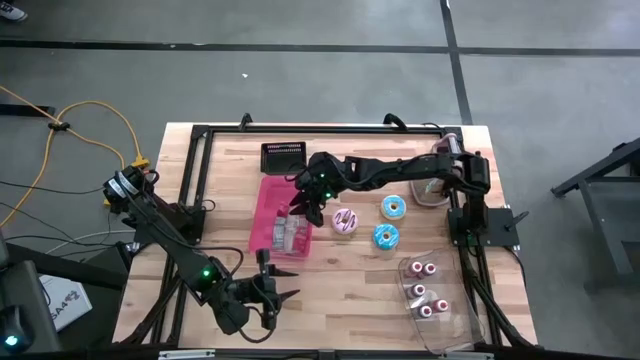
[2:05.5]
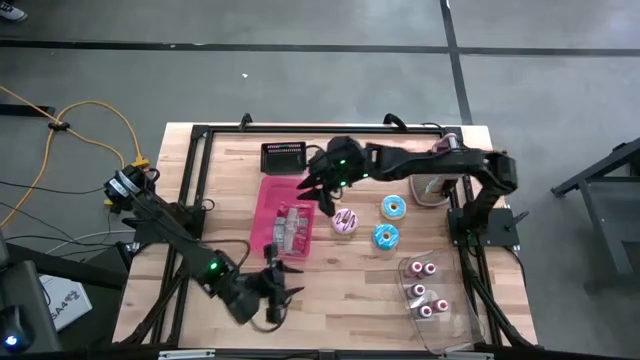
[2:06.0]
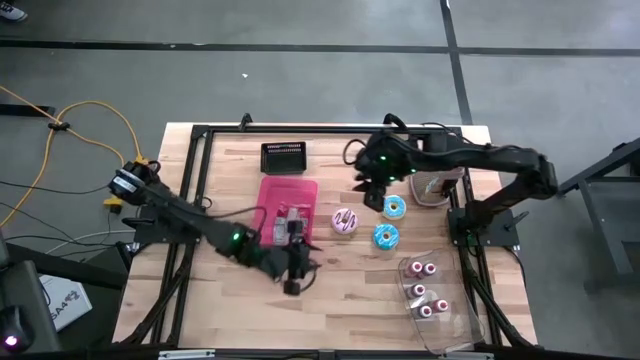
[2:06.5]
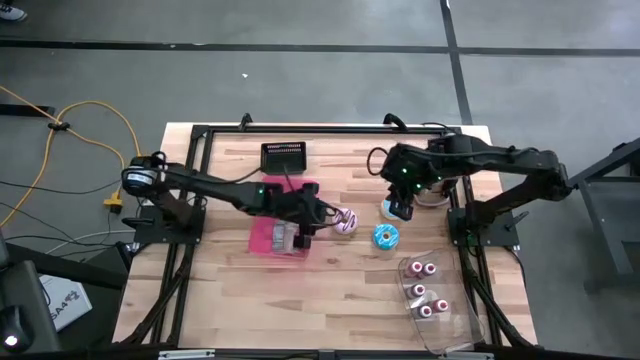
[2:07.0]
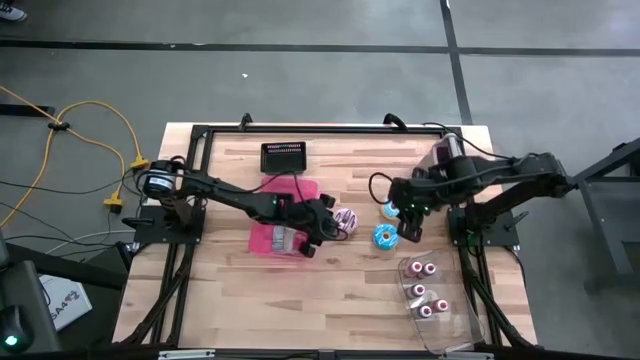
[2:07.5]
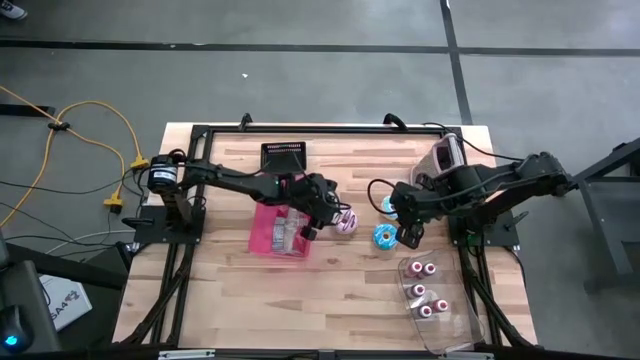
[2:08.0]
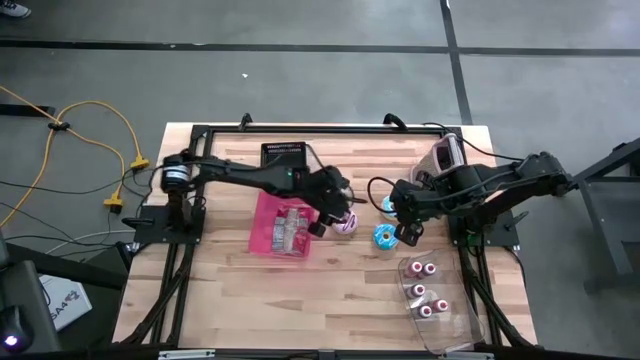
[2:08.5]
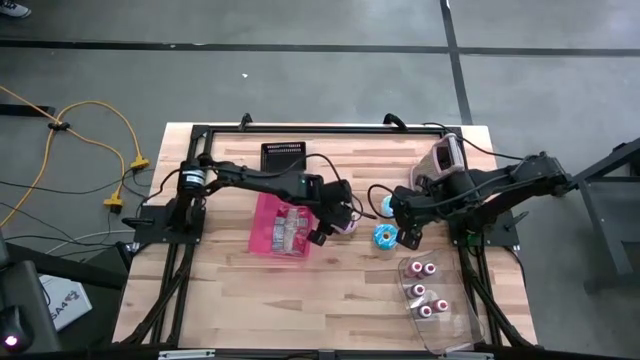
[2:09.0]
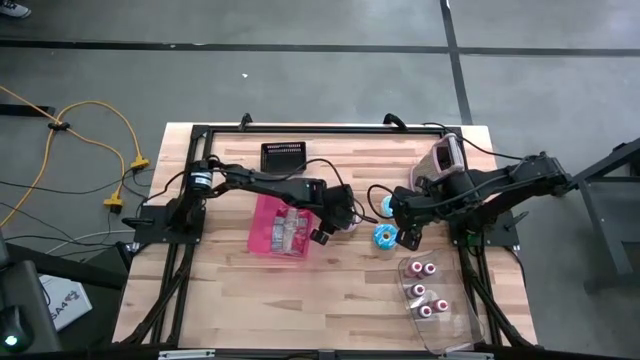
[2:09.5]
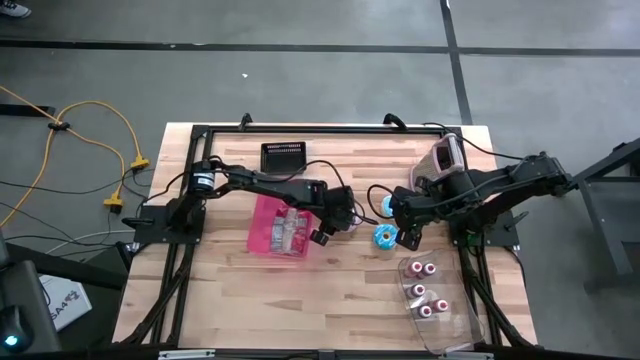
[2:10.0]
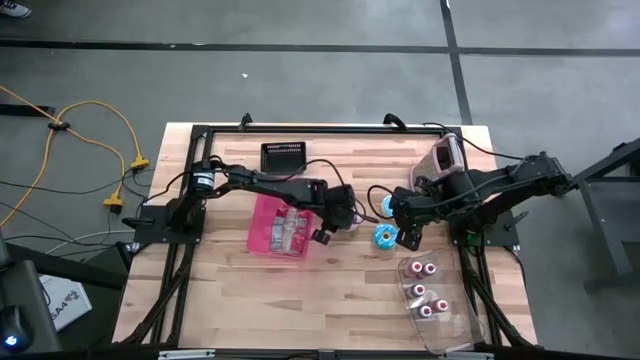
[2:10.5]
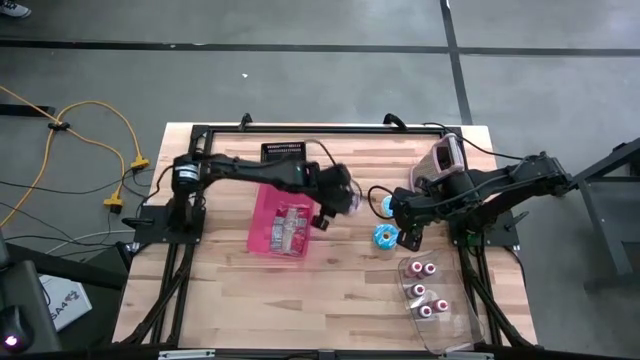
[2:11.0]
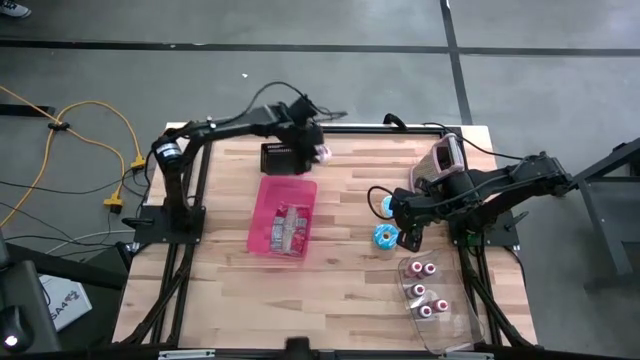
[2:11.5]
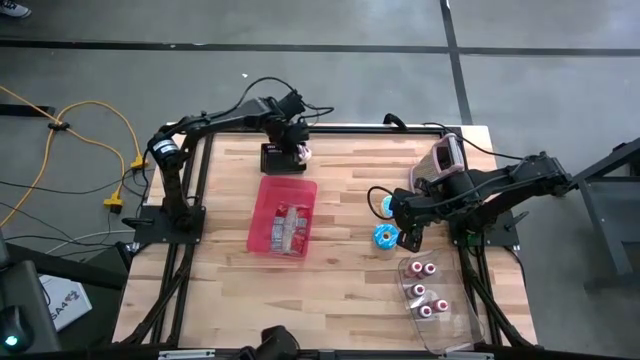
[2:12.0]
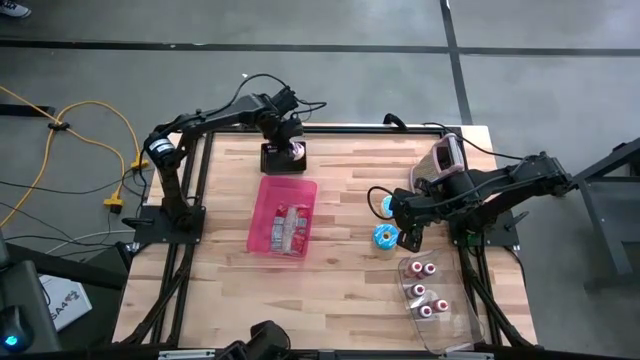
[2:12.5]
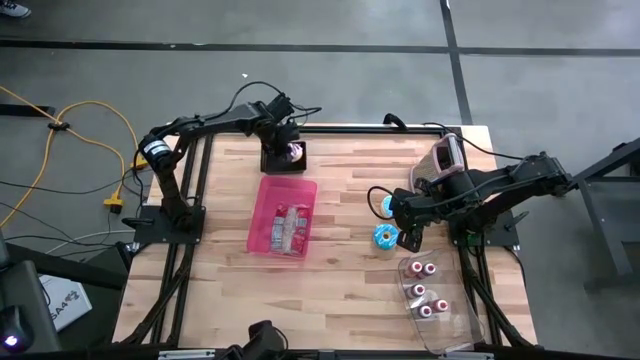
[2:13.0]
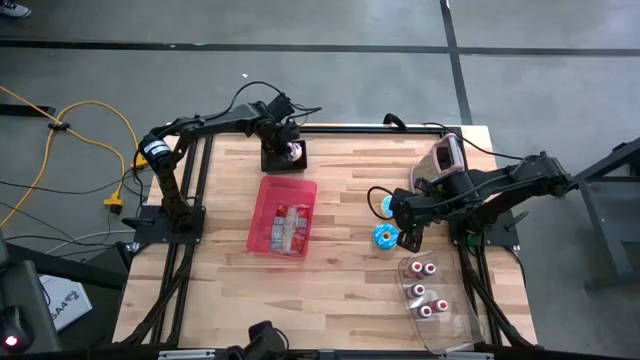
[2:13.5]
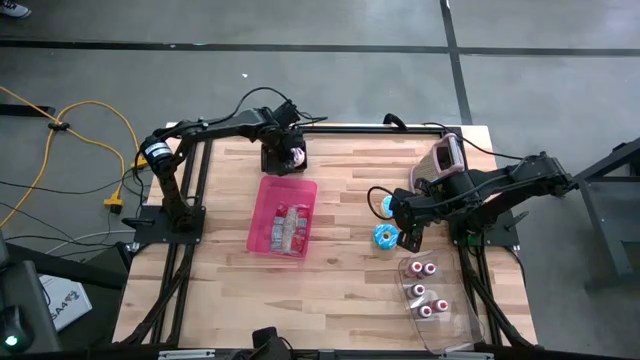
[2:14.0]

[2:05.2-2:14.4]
Put the purple donut into the black bin

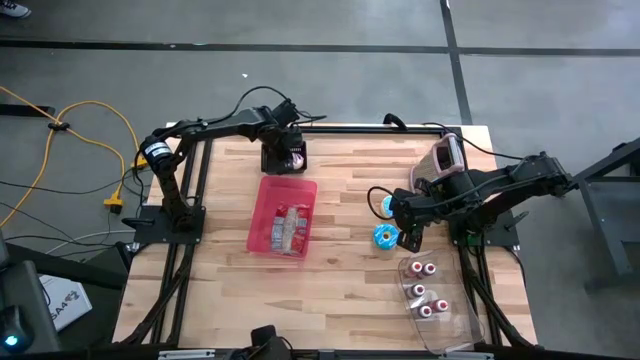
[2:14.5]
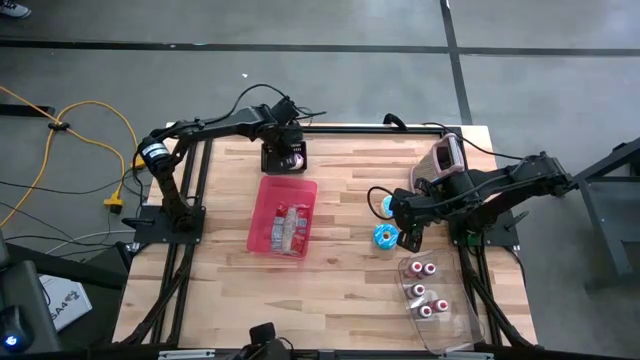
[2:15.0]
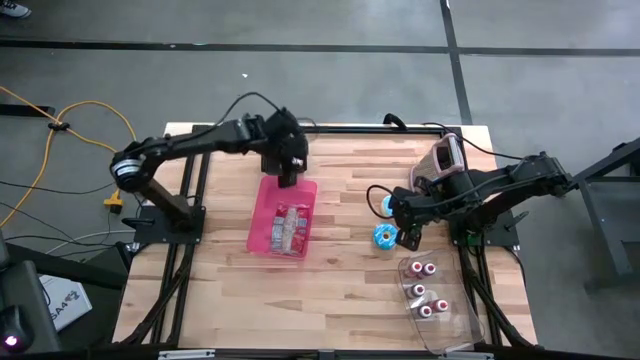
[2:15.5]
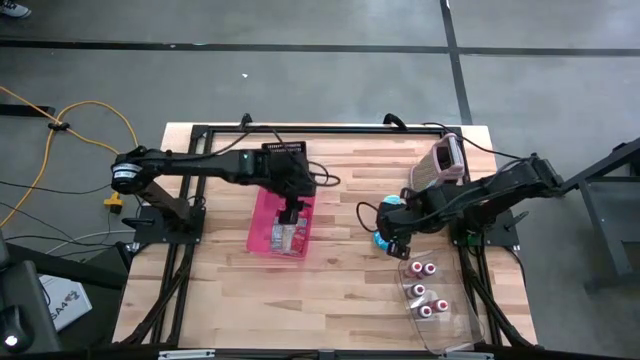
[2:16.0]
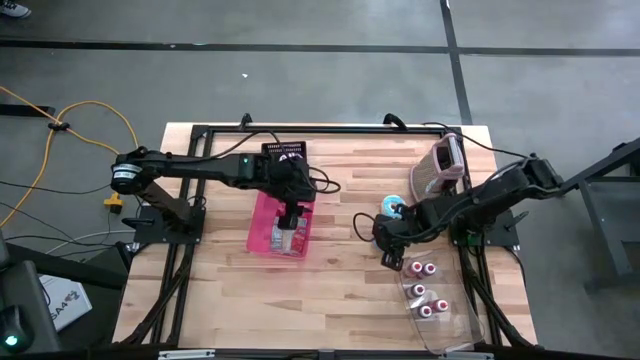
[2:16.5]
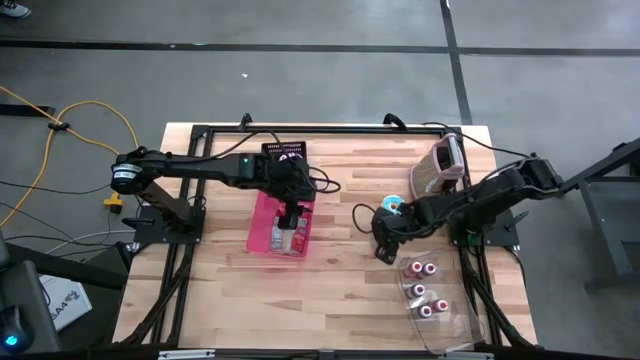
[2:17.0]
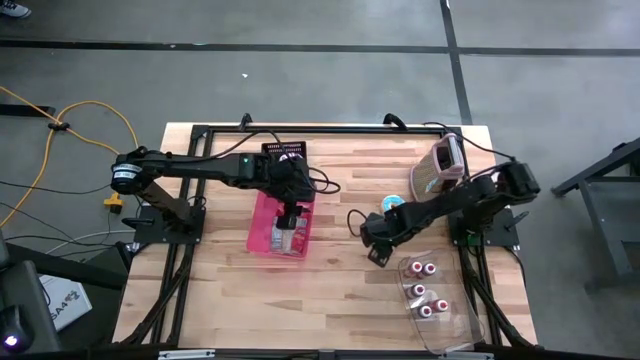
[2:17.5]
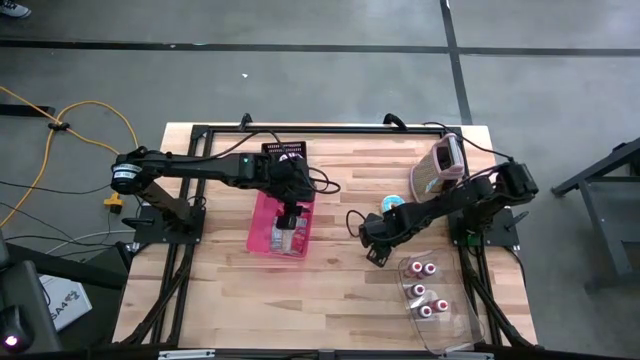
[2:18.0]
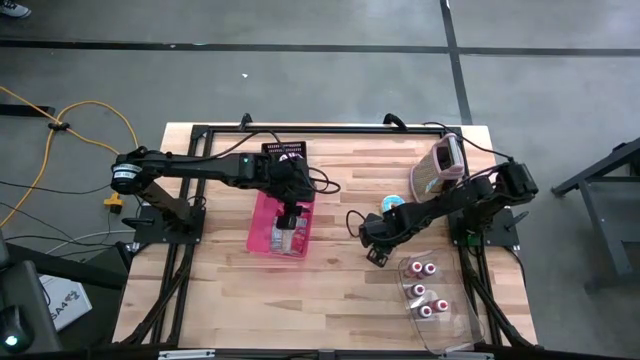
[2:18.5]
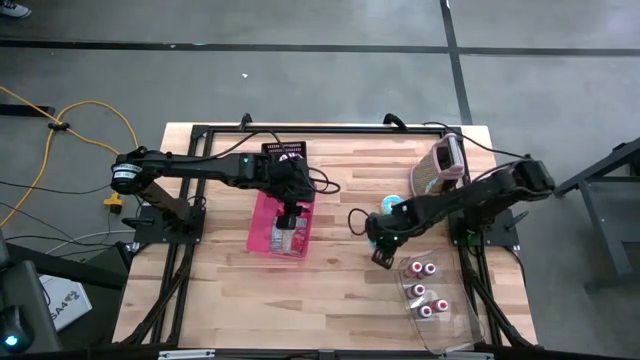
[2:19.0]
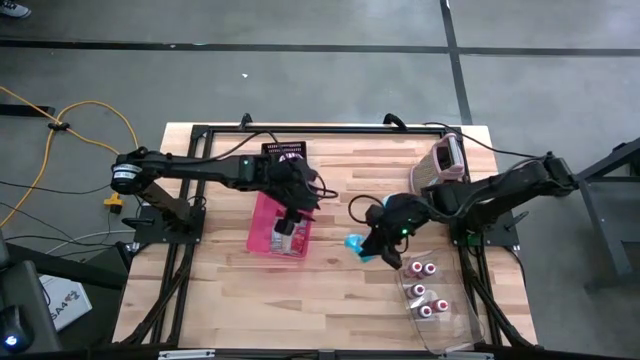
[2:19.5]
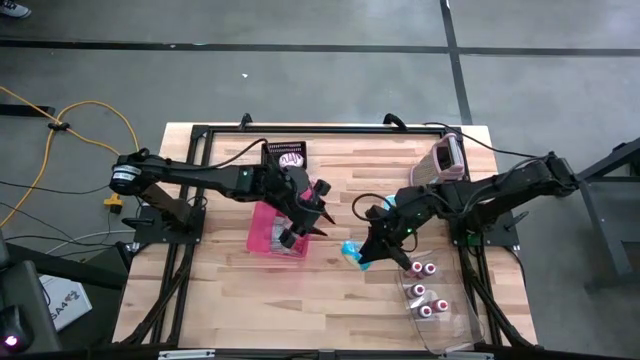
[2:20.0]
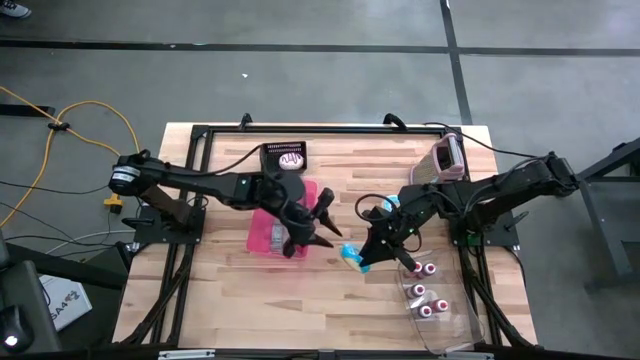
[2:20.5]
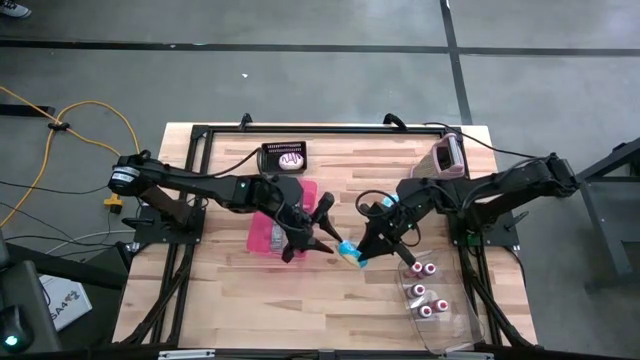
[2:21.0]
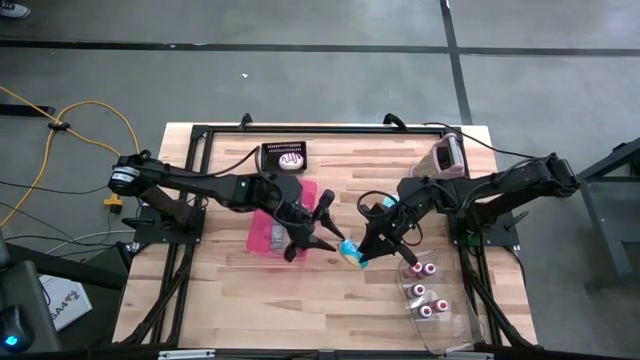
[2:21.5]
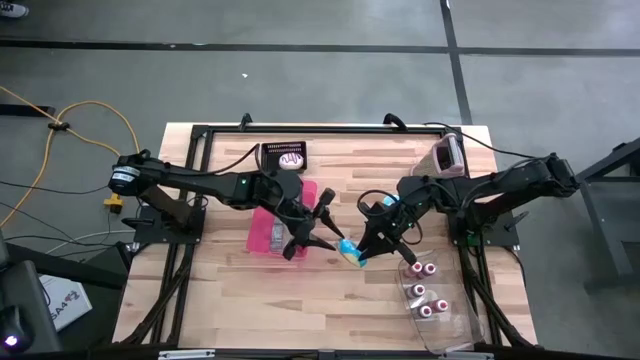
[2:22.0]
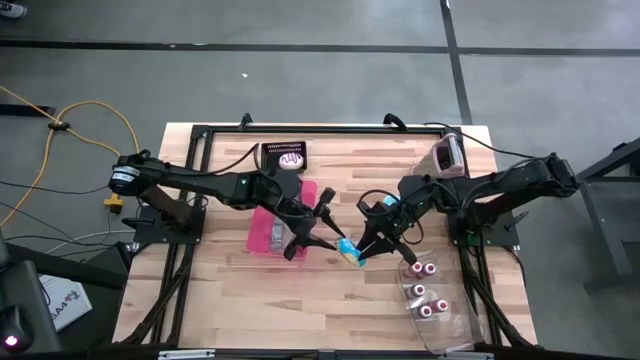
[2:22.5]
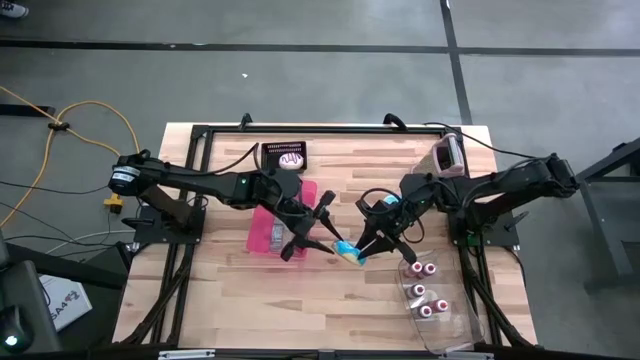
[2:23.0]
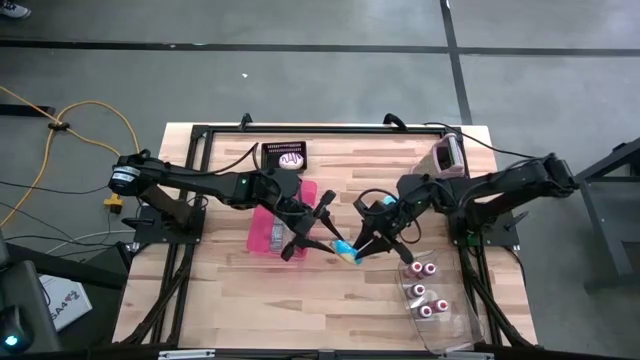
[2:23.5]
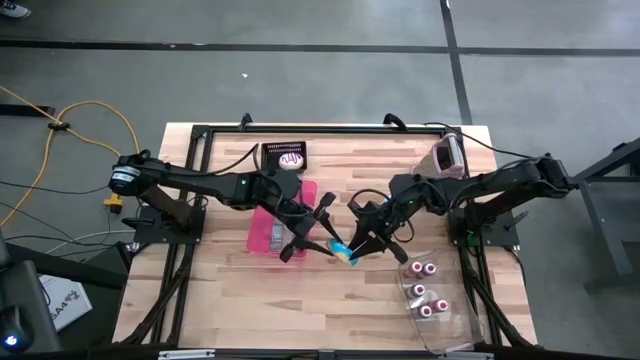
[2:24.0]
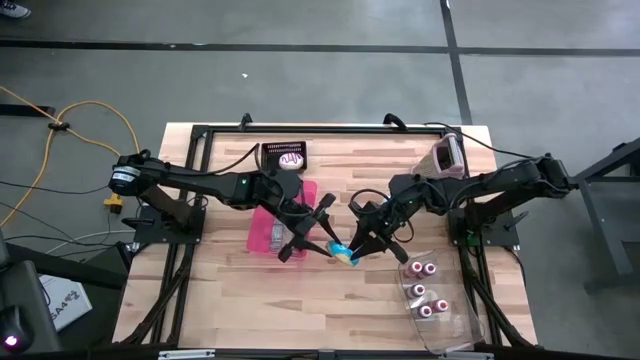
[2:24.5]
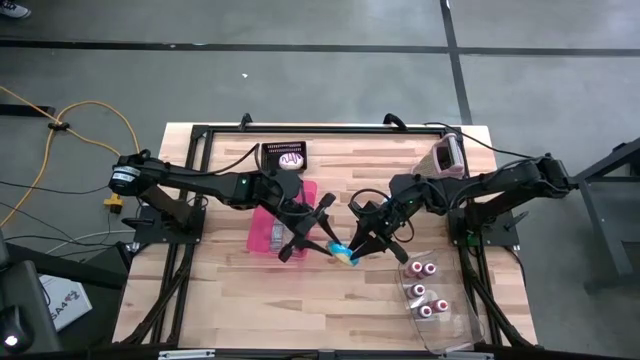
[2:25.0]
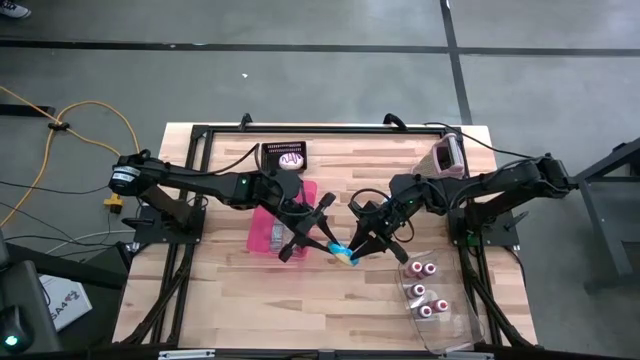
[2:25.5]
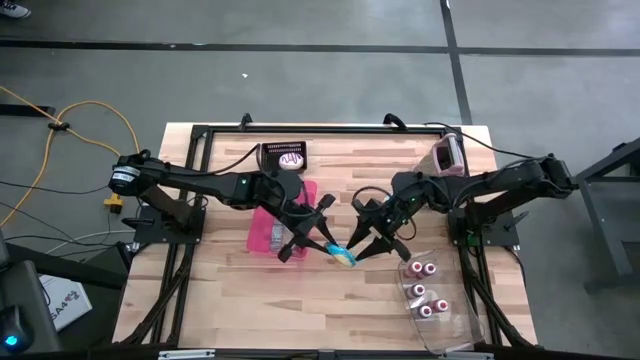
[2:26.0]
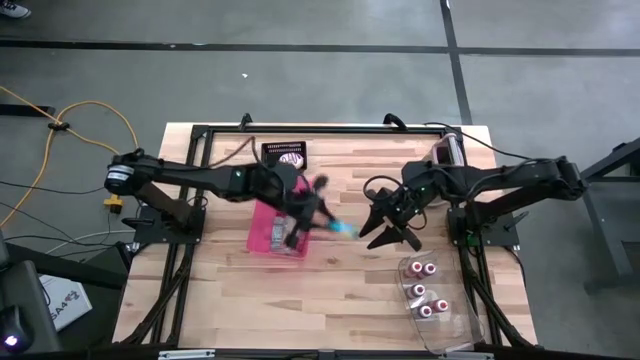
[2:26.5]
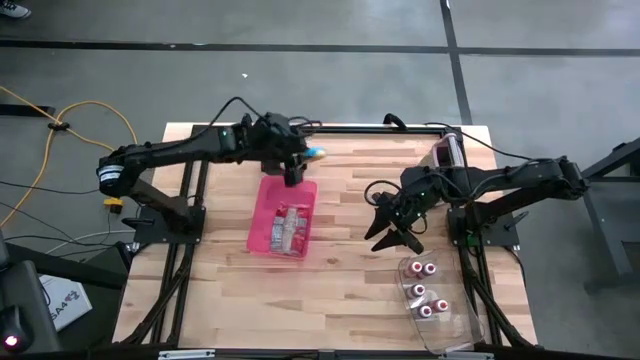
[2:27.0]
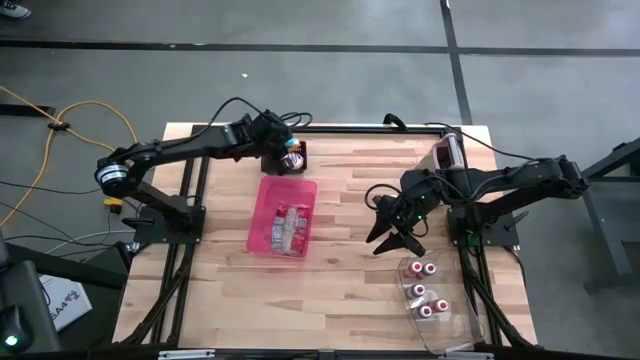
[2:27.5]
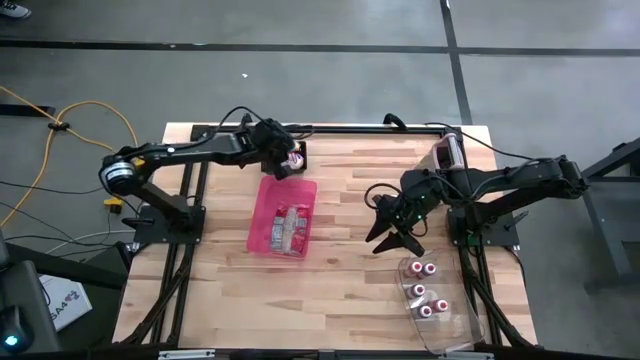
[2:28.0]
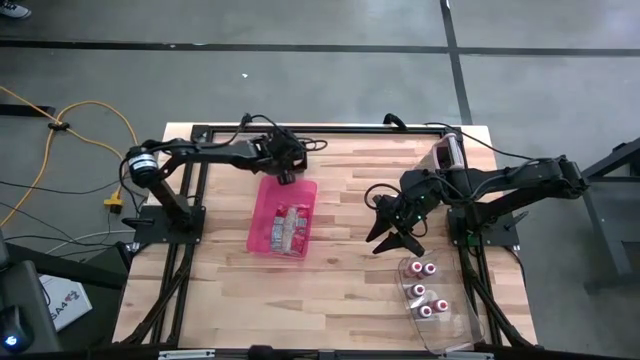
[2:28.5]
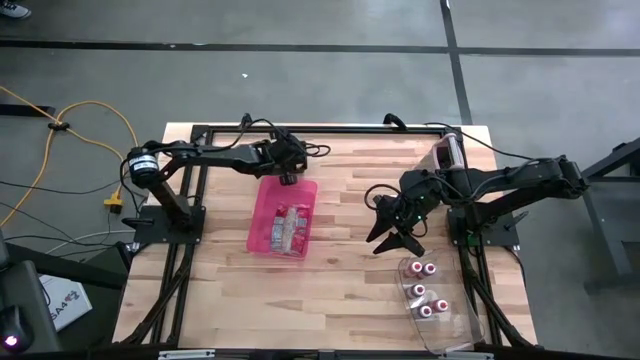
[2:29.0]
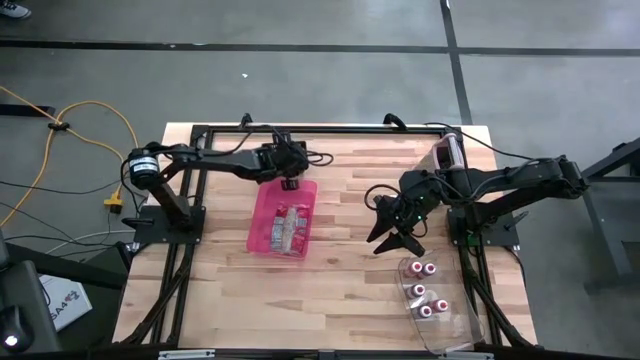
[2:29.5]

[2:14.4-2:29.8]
Put the bottom blue donut into the black bin
